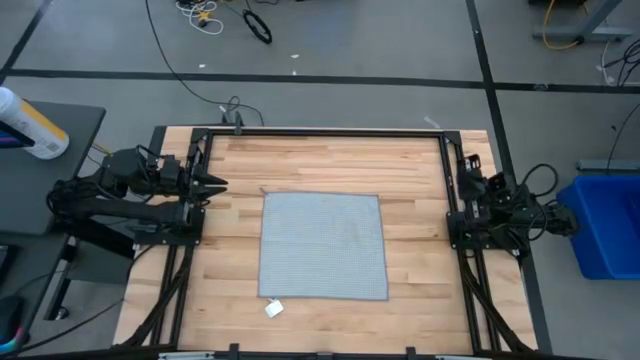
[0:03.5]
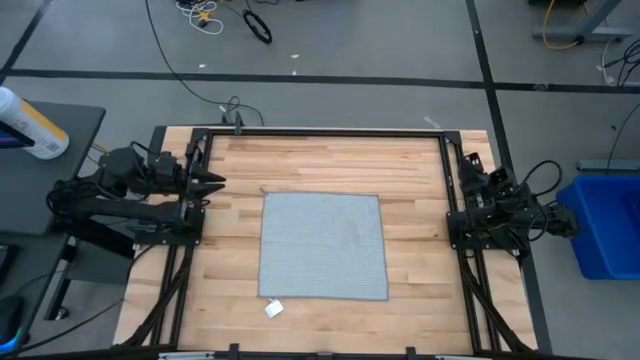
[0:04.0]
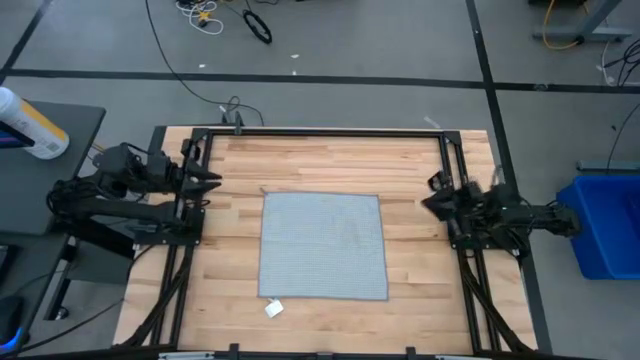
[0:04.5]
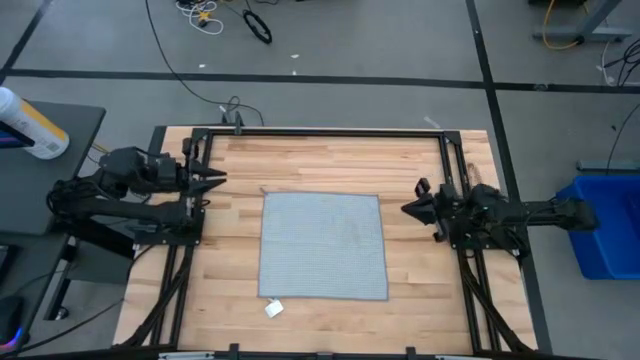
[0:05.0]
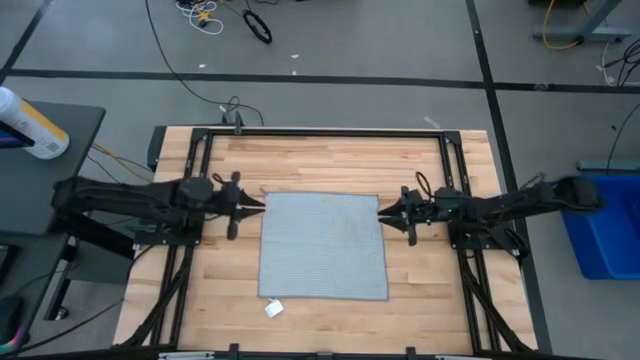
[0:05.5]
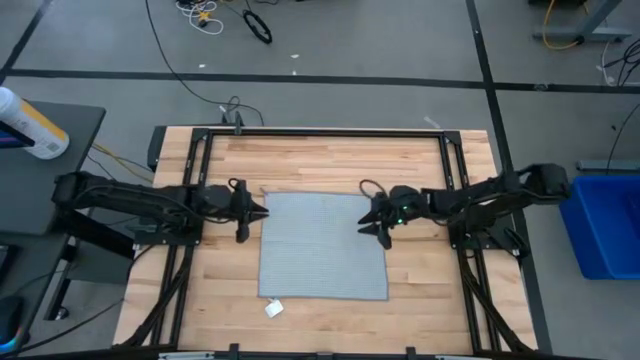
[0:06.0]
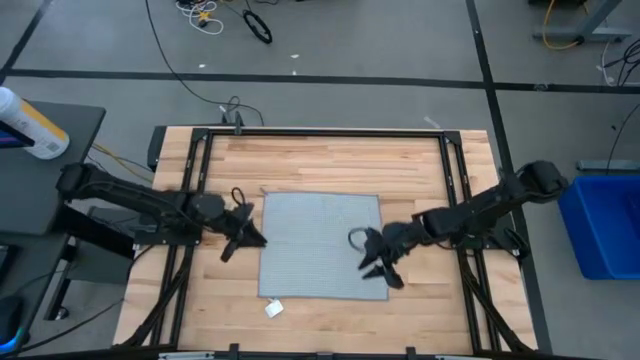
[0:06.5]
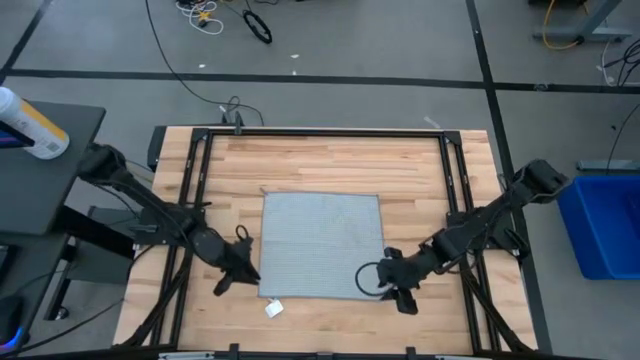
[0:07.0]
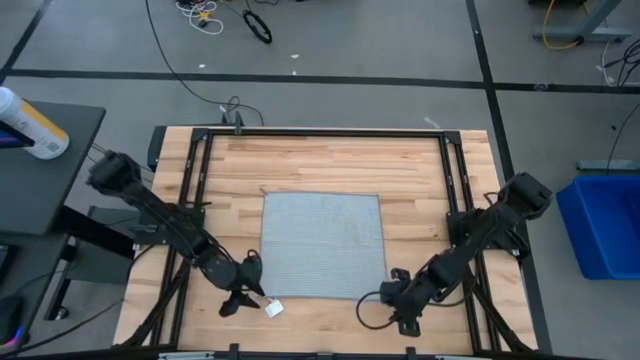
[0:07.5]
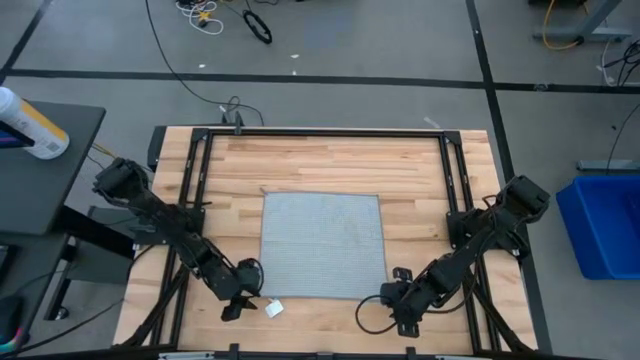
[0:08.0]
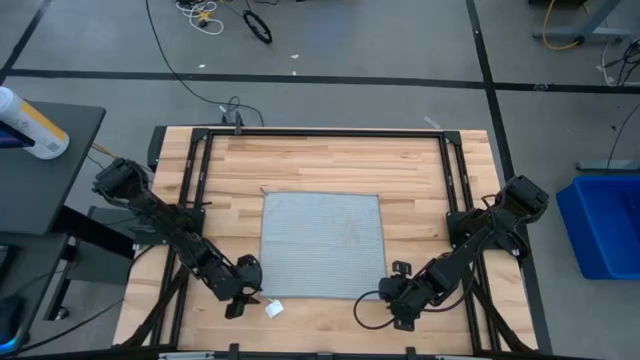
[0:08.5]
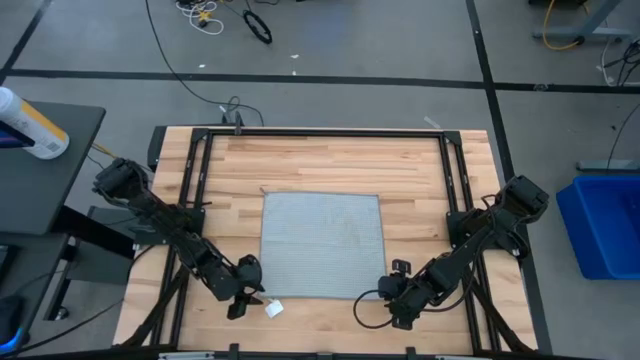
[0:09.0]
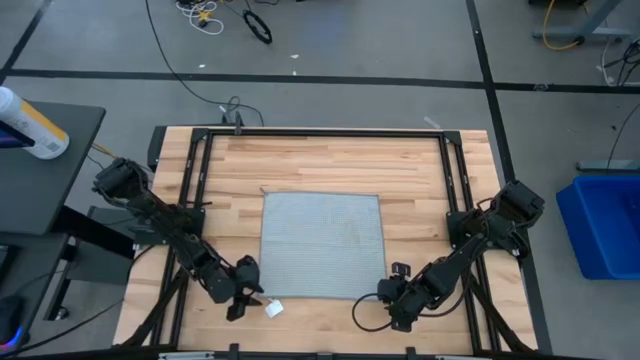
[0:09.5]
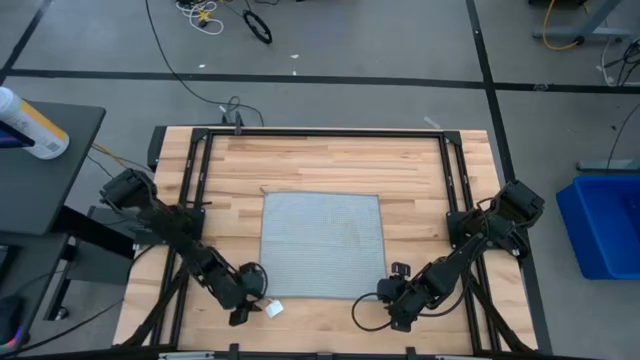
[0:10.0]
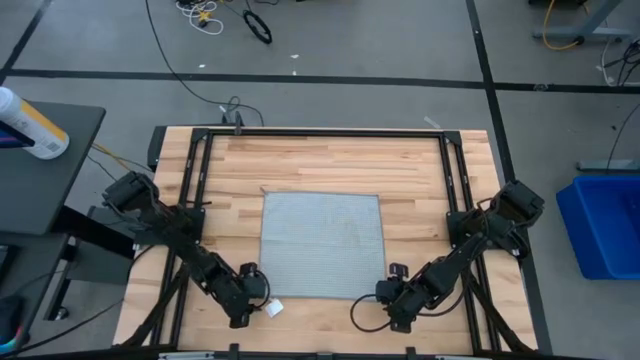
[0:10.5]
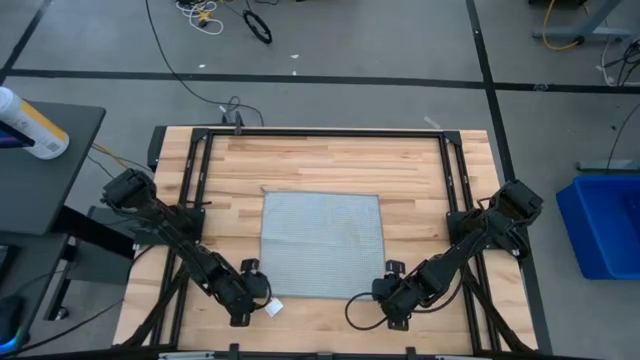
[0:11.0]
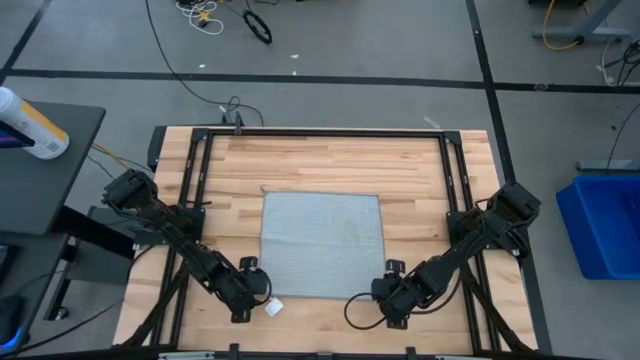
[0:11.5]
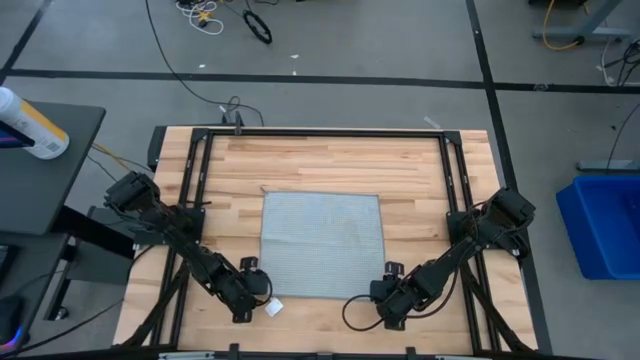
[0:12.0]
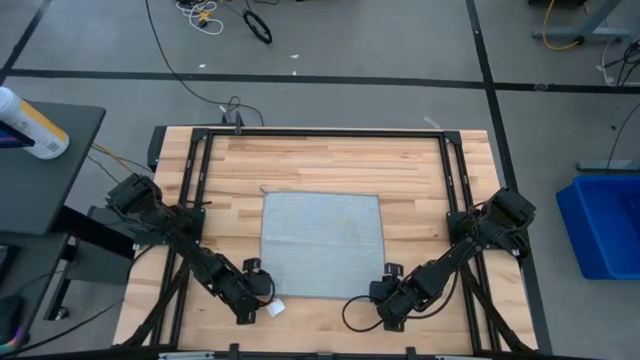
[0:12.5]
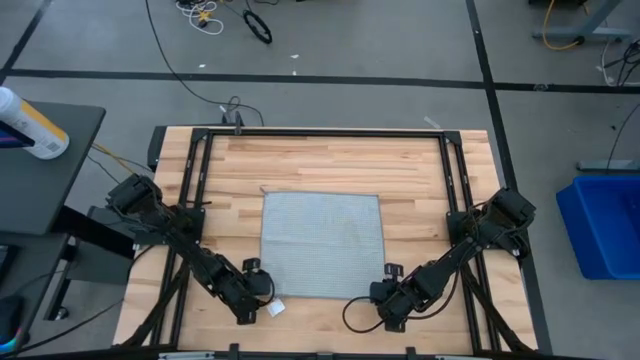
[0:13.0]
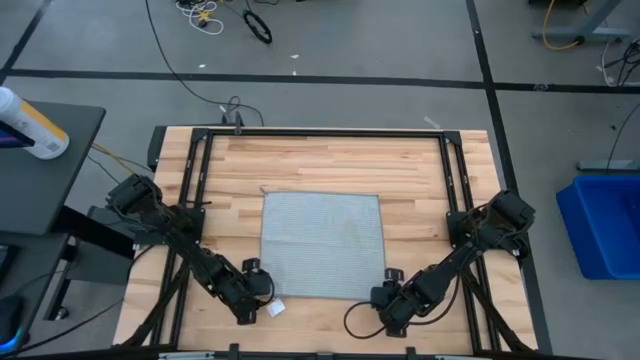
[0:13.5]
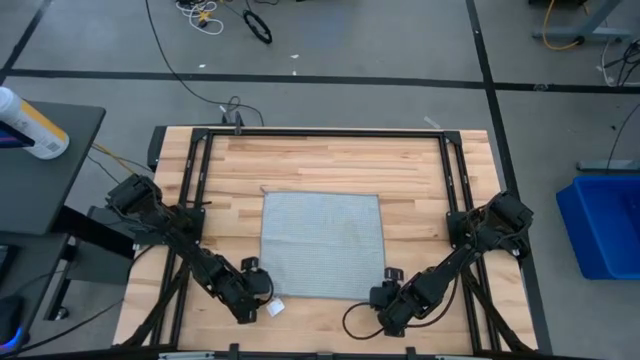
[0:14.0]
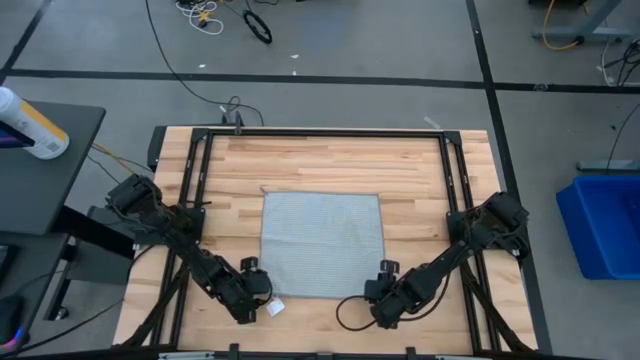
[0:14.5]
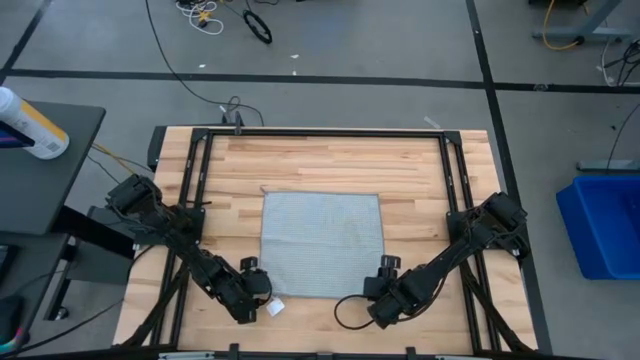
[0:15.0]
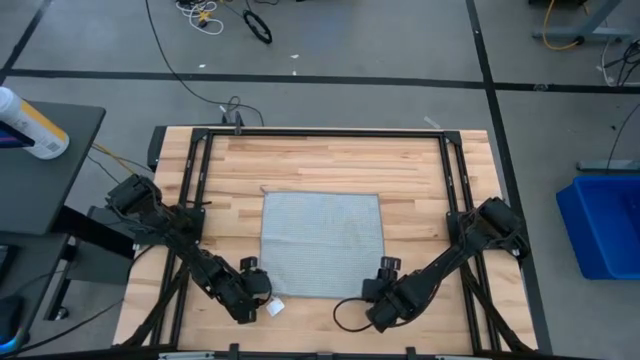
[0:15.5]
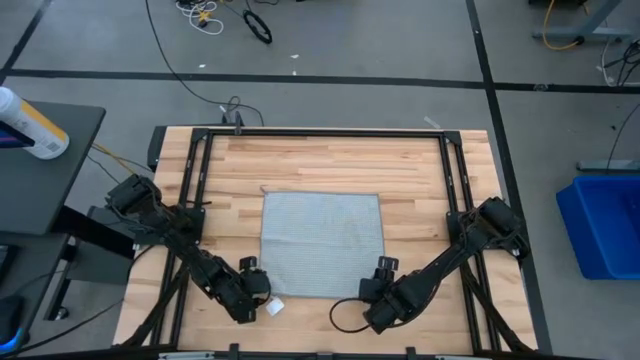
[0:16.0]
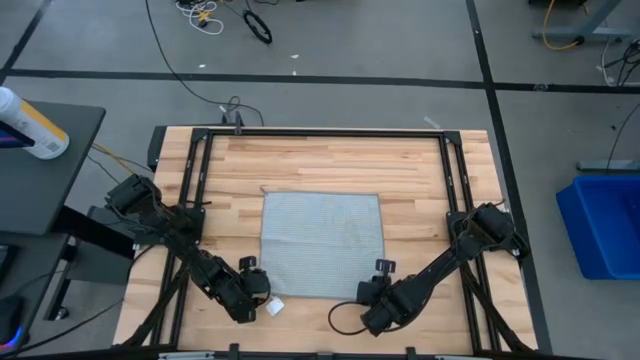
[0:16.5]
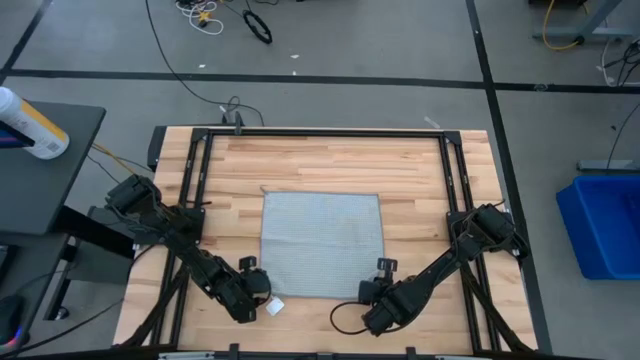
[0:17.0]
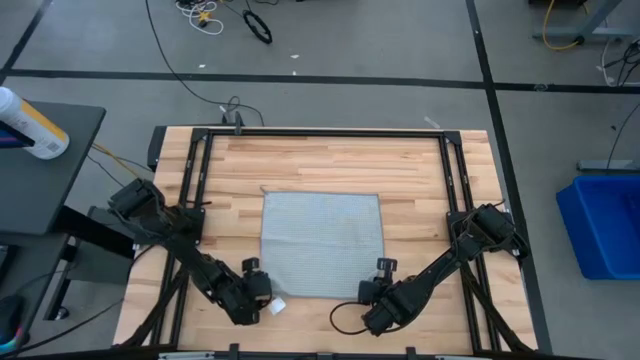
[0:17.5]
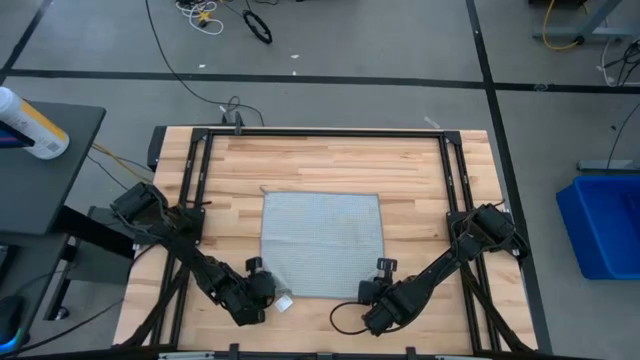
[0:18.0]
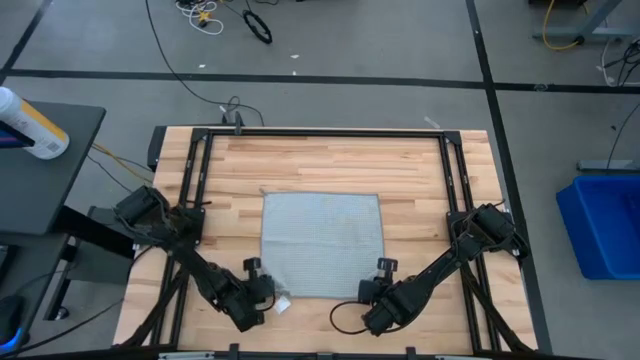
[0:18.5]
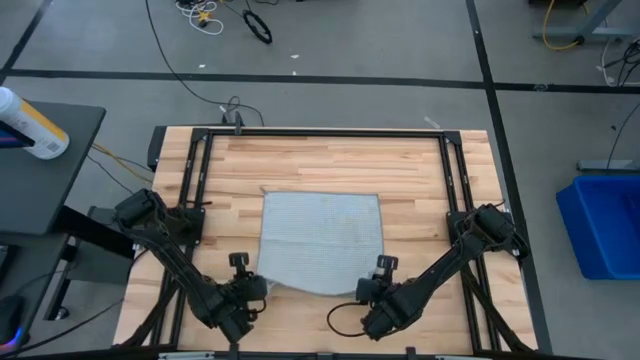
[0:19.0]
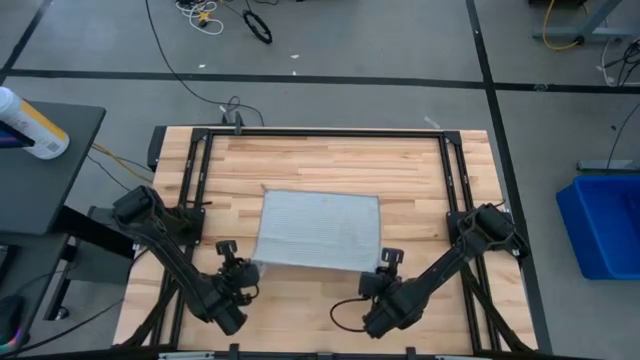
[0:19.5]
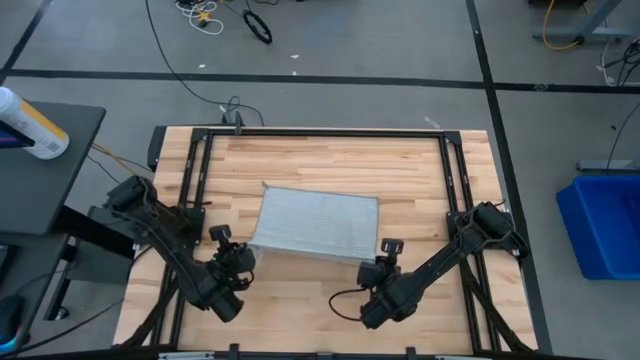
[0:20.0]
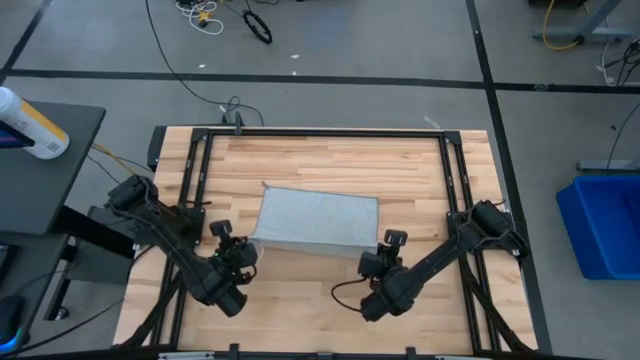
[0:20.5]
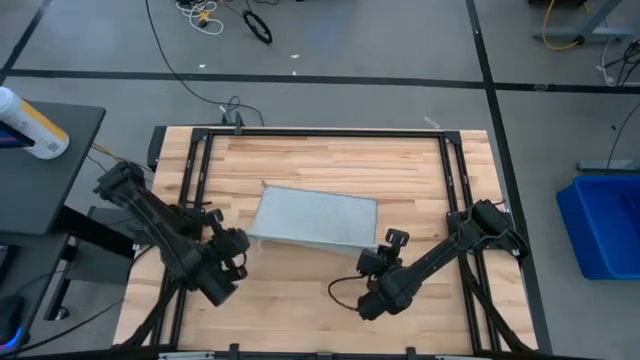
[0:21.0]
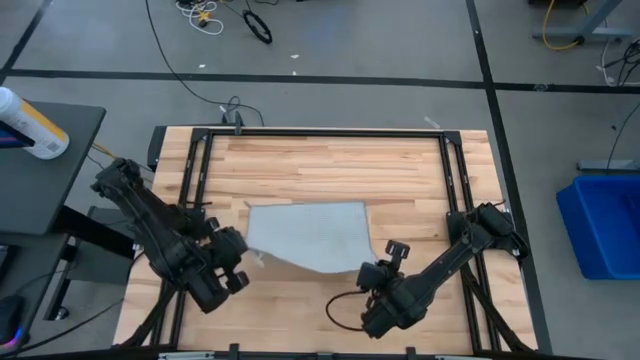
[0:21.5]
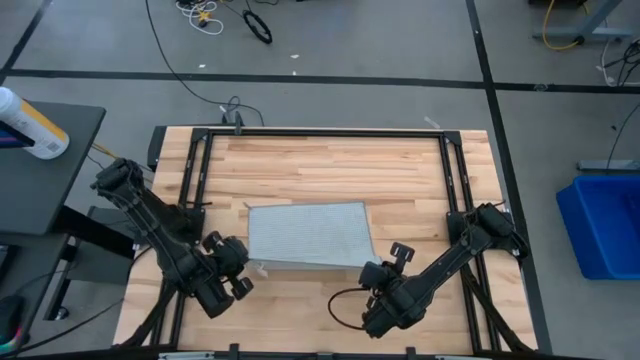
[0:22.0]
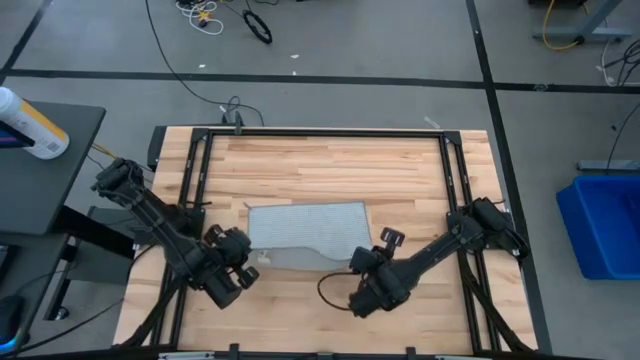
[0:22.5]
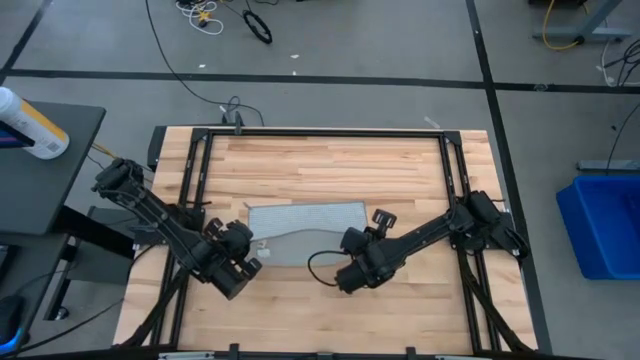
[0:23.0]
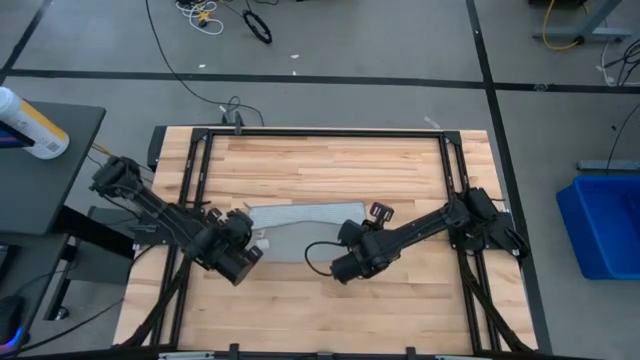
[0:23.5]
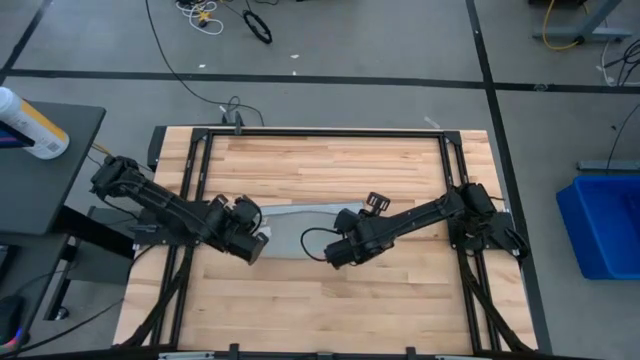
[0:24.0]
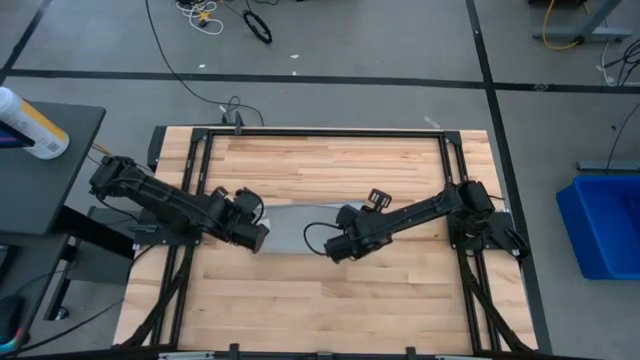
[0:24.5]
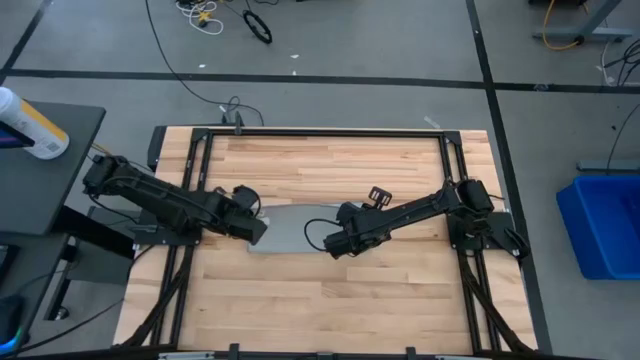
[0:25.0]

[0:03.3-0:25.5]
Task: Fold microfiber towels
Fold the gray microfiber towel
